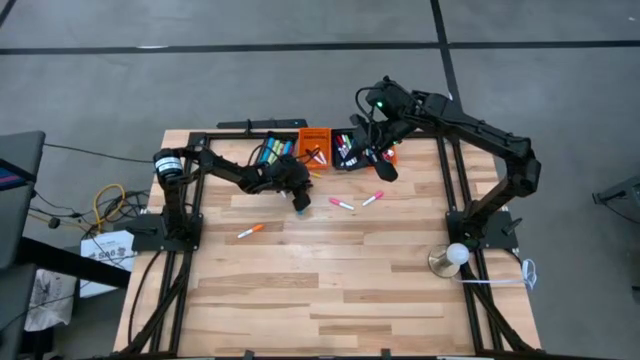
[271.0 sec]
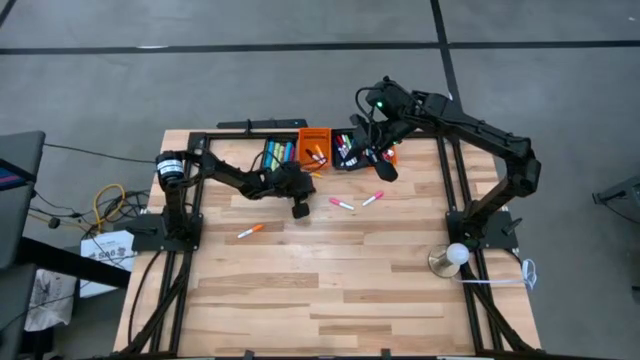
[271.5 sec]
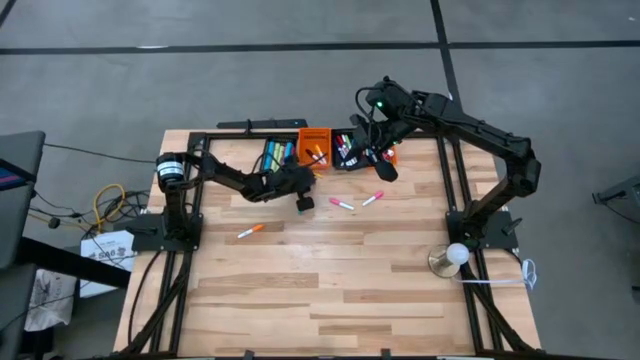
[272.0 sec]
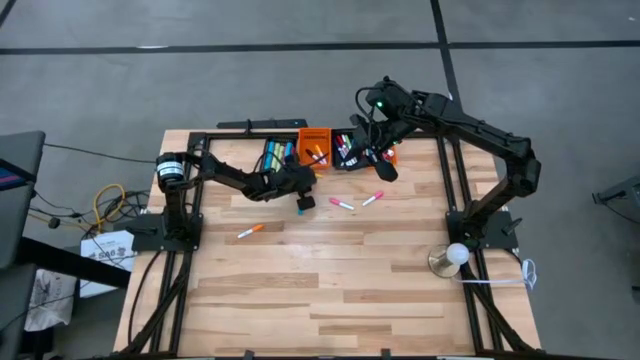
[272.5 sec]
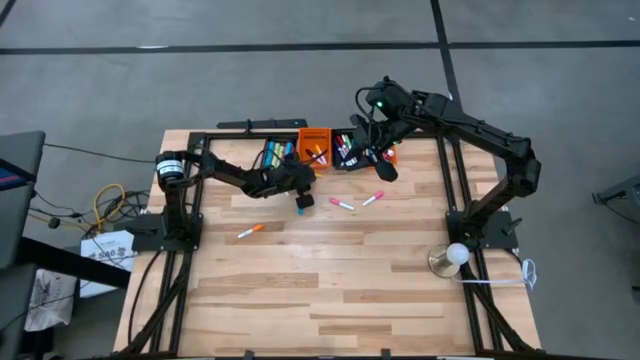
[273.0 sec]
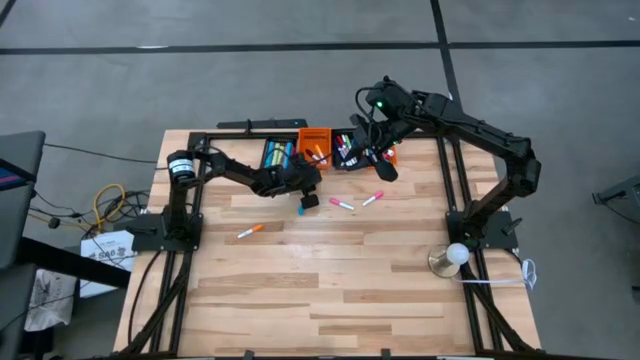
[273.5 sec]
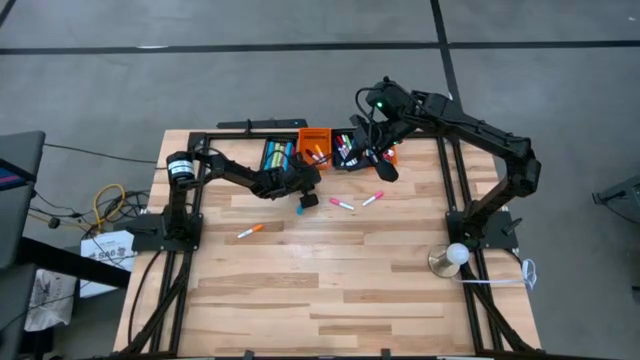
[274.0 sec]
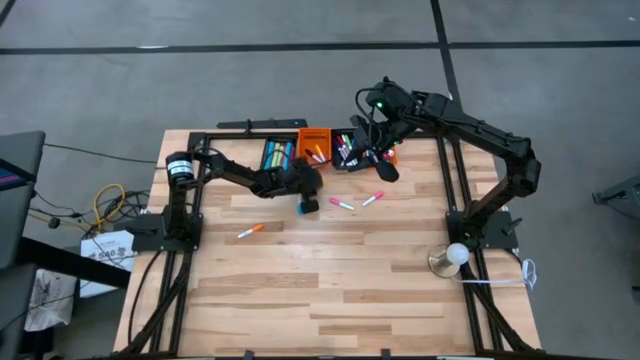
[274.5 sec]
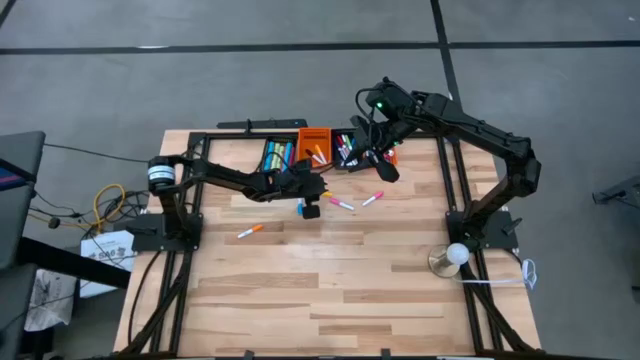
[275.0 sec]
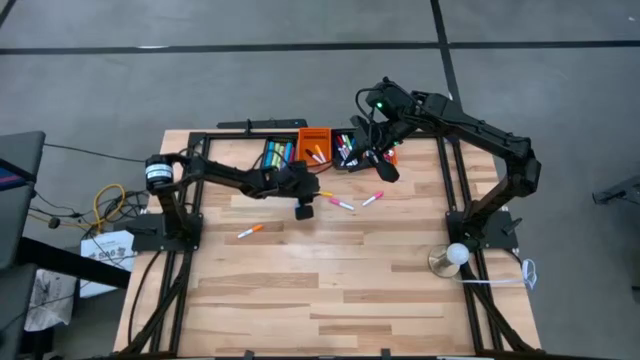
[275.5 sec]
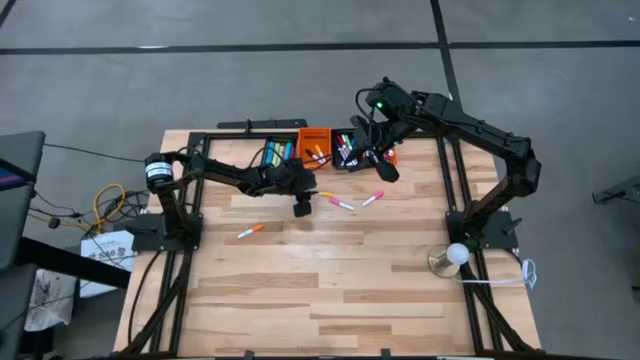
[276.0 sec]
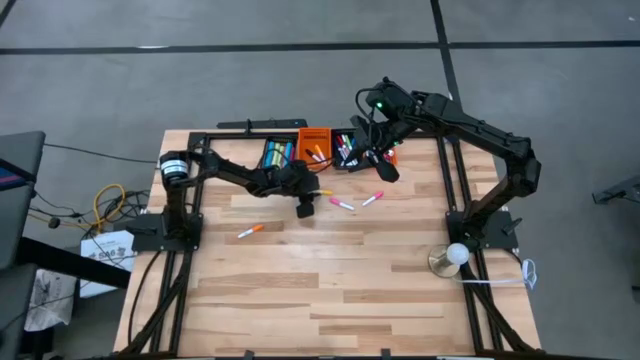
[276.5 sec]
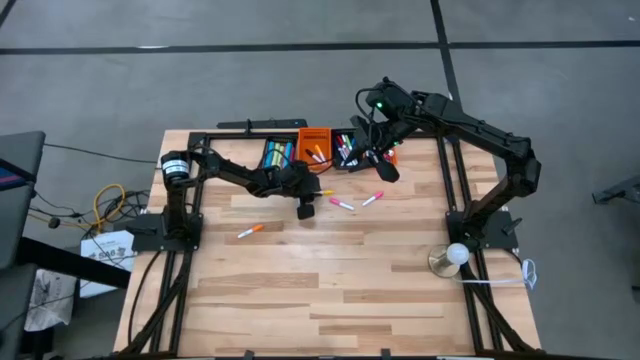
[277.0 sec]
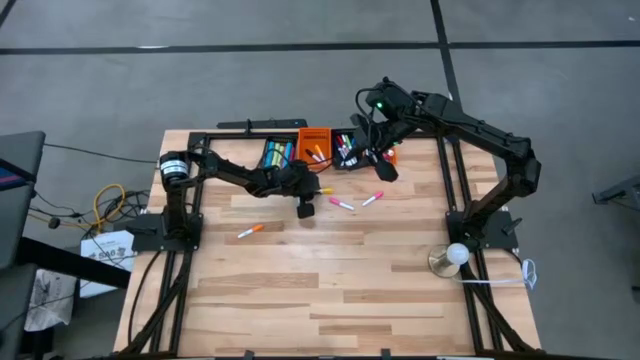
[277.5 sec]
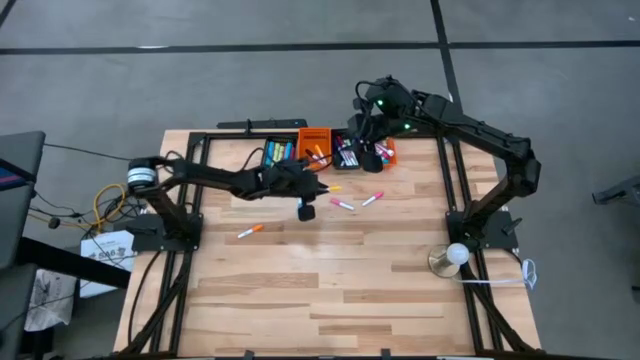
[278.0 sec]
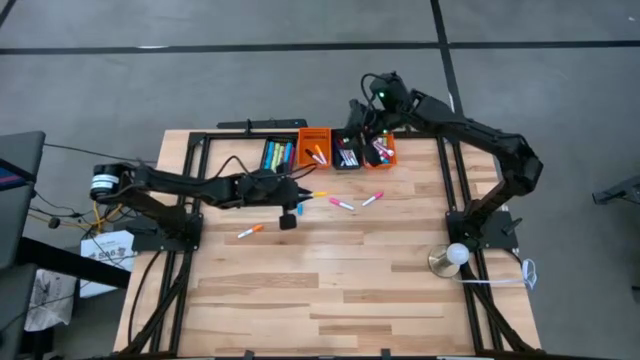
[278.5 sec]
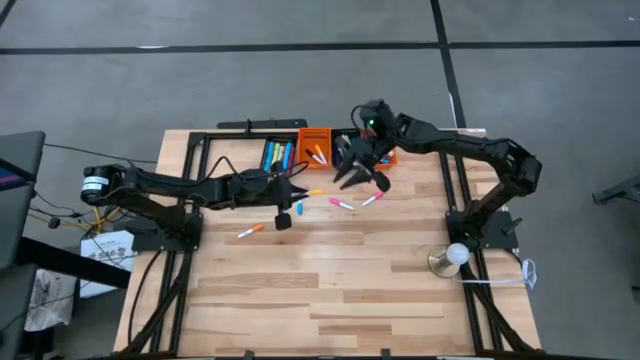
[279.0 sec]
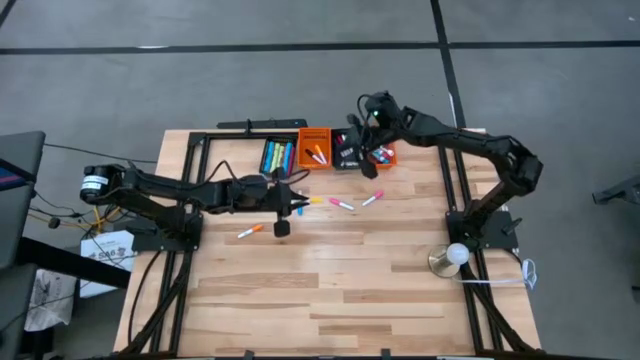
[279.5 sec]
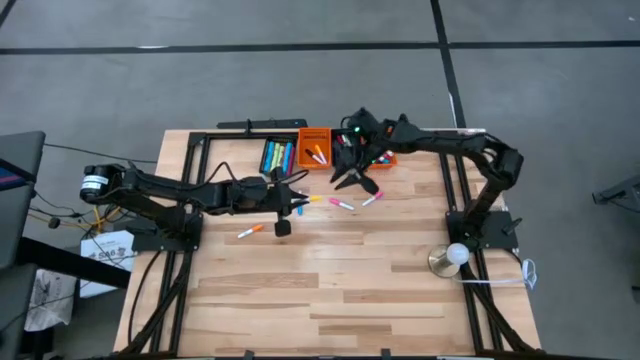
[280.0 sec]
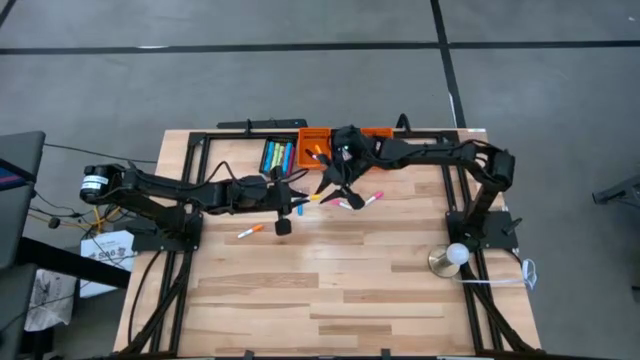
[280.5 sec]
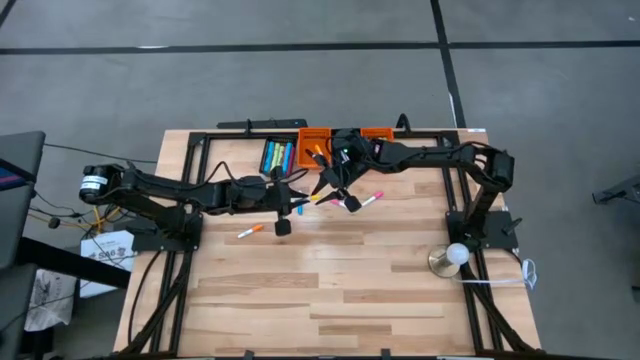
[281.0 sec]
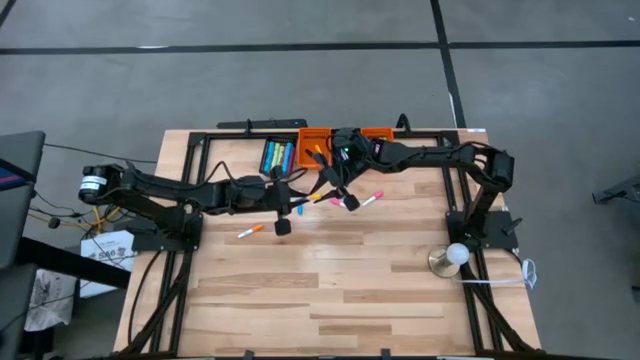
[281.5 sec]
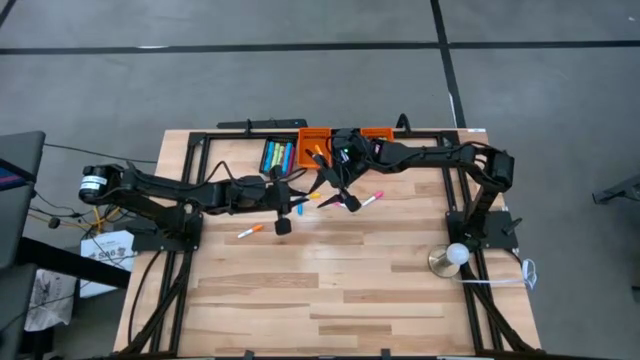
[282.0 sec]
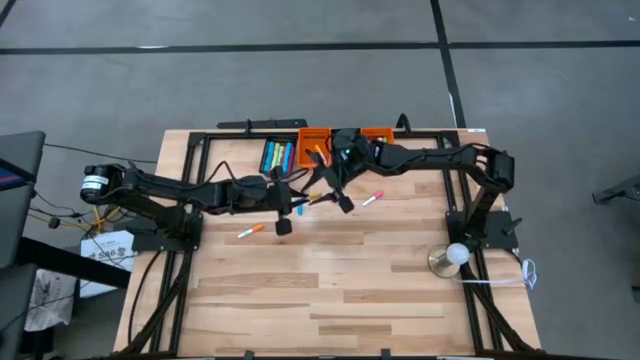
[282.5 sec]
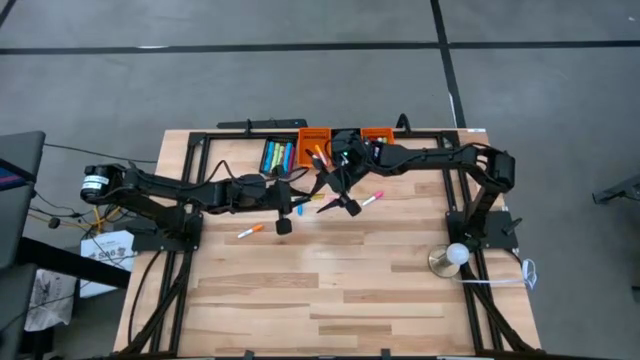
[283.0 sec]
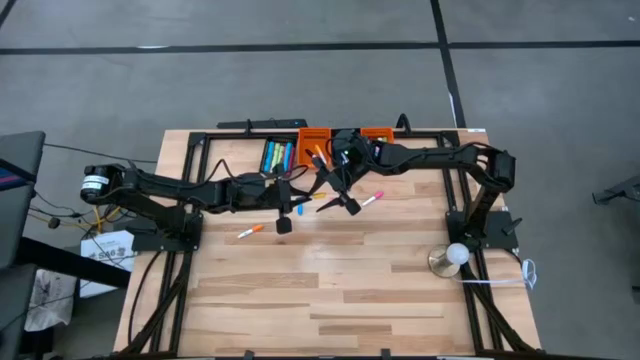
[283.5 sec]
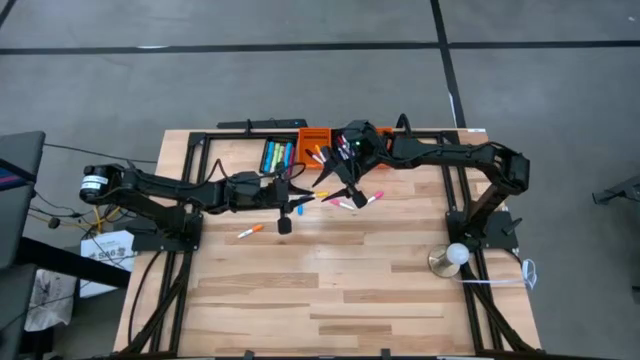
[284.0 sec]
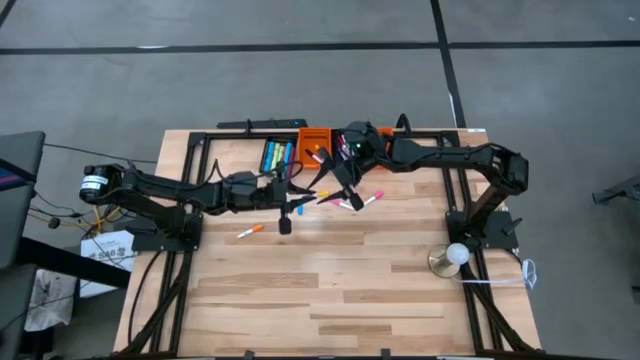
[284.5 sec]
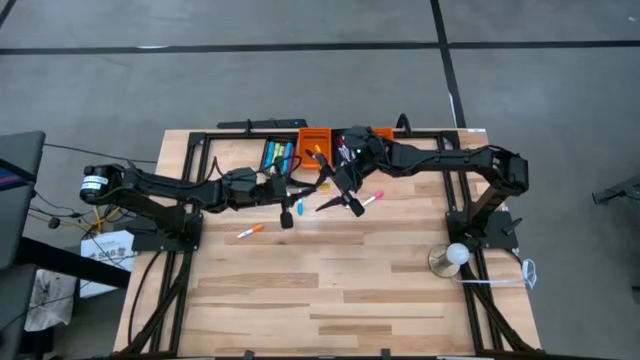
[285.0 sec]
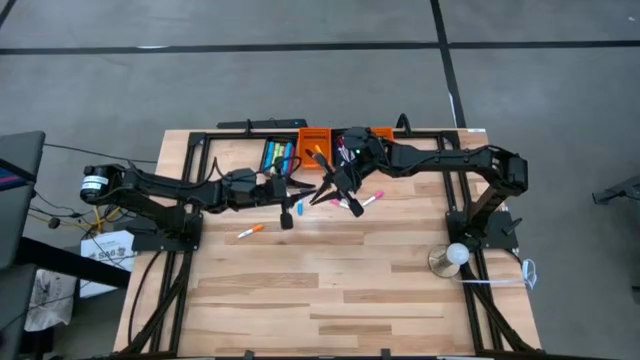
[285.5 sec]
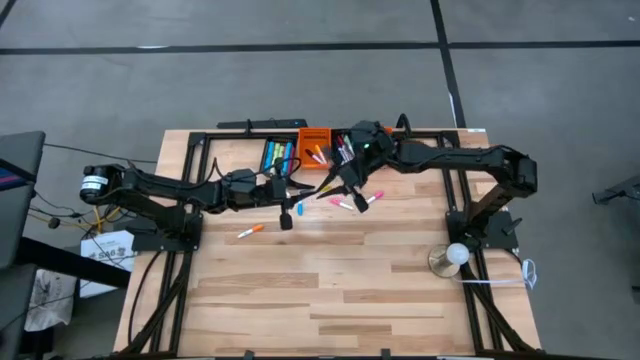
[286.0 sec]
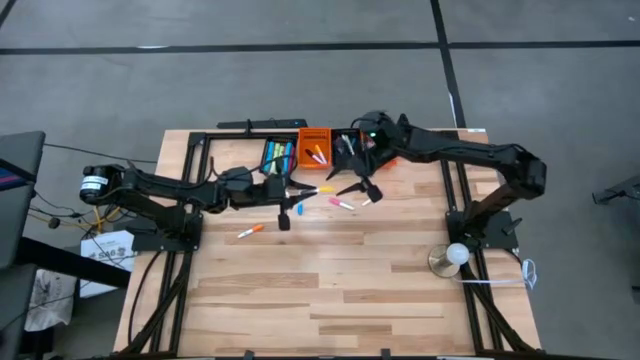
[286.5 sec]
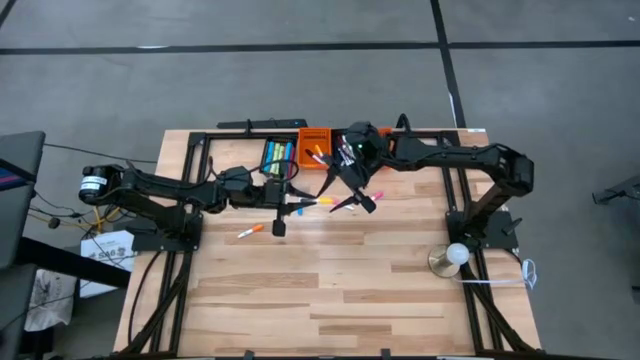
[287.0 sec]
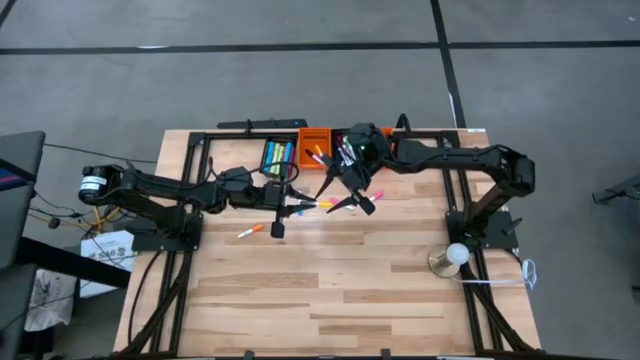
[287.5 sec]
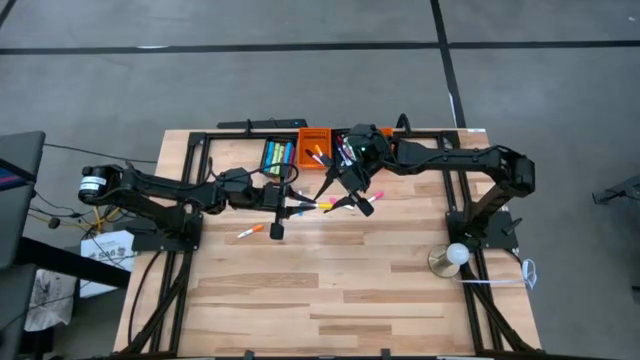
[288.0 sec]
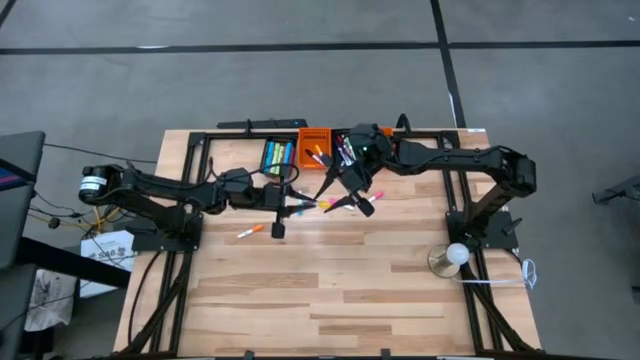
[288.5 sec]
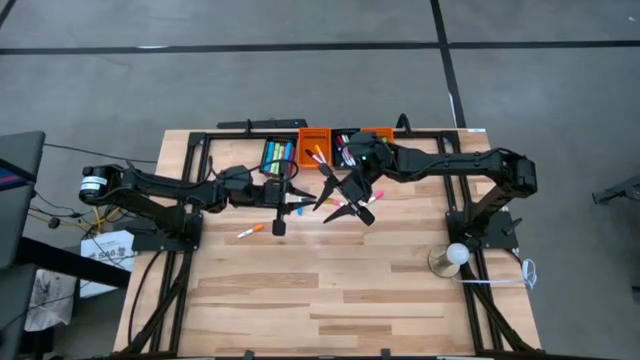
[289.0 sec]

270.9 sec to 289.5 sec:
Task: Pick & Place Markers
Put the small yellow highlighter pen into the left orange basket

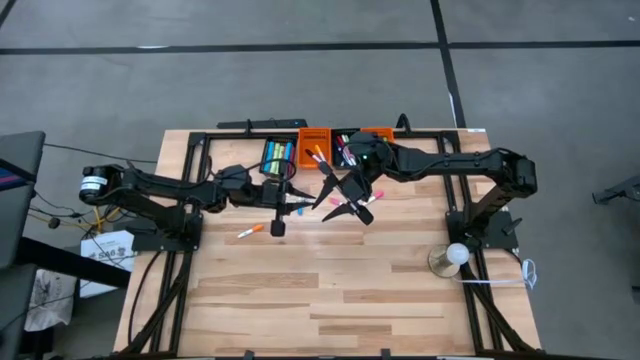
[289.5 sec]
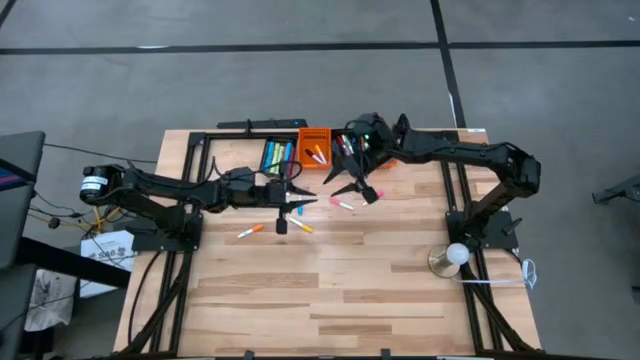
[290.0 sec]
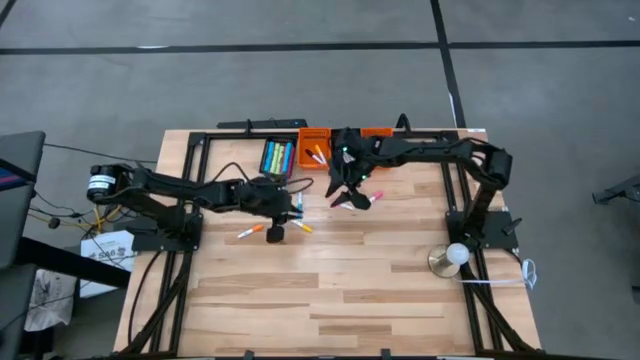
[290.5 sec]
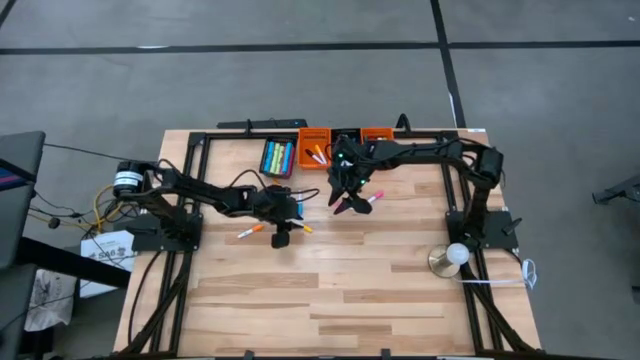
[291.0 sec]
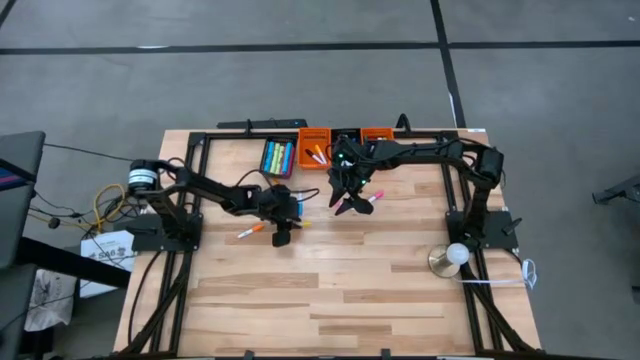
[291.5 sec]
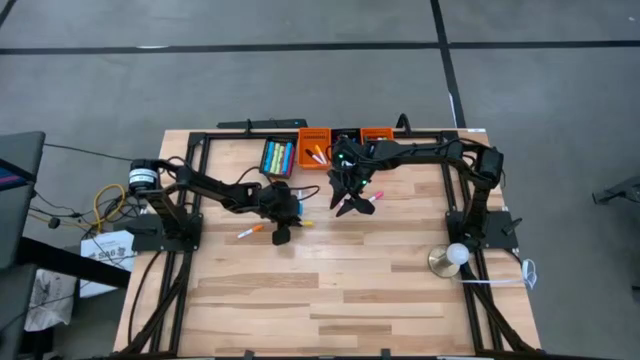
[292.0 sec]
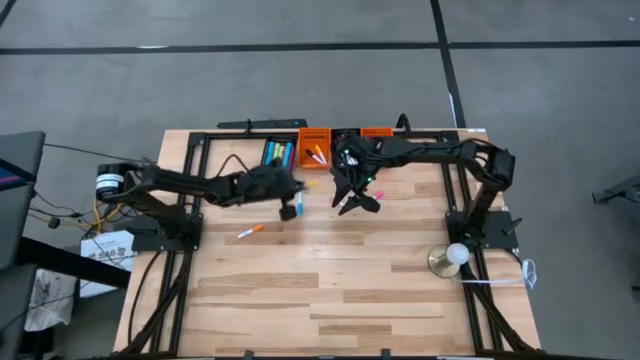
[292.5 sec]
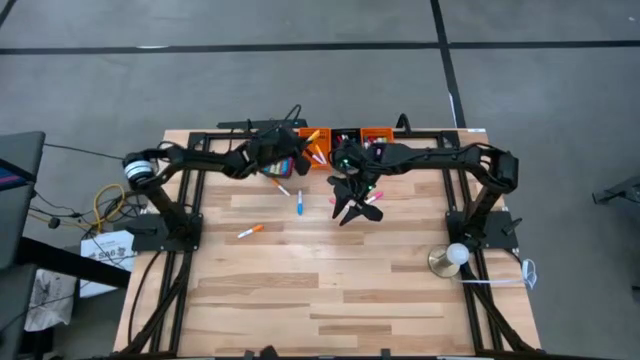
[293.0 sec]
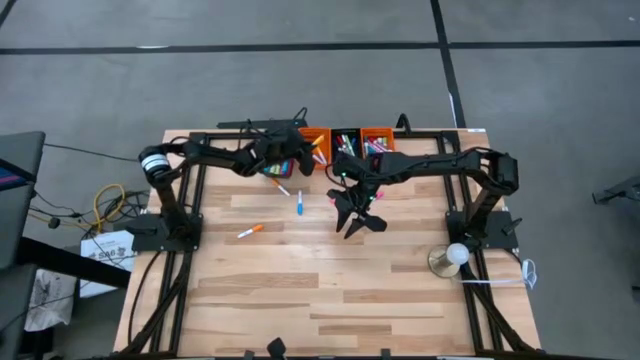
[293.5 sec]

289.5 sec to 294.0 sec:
Put the small yellow highlighter pen into the left orange basket
